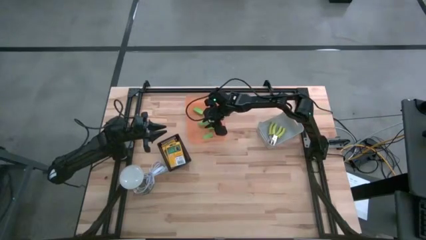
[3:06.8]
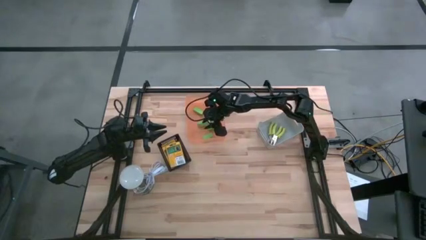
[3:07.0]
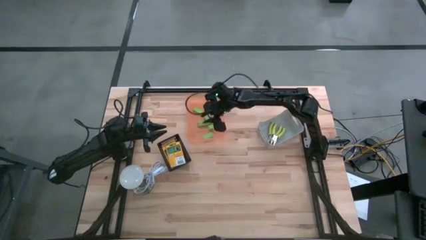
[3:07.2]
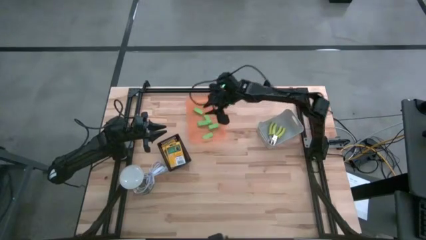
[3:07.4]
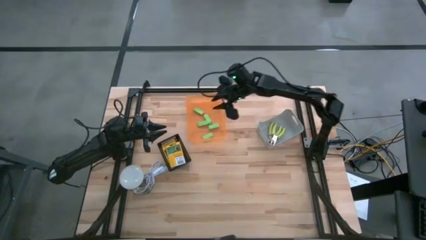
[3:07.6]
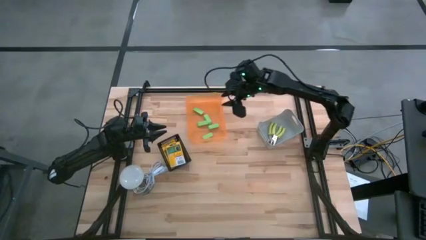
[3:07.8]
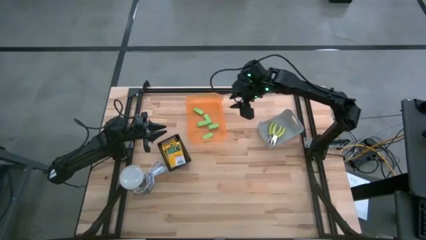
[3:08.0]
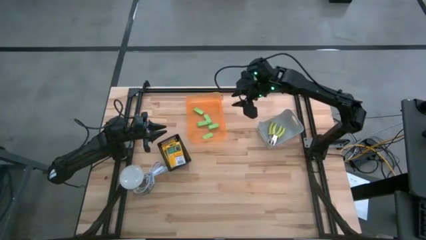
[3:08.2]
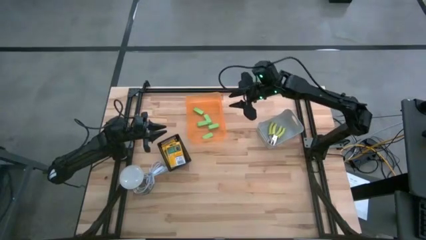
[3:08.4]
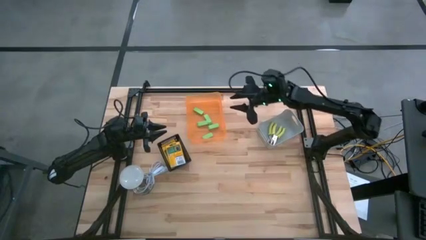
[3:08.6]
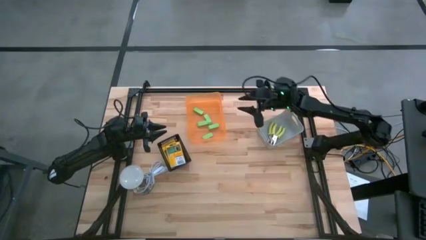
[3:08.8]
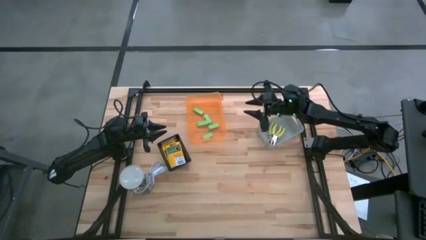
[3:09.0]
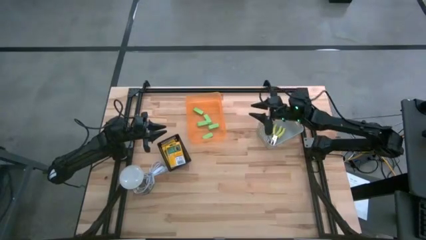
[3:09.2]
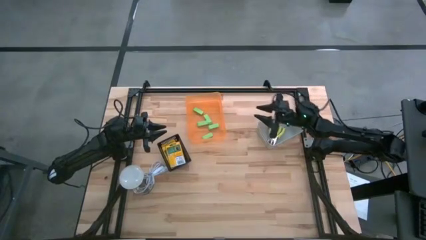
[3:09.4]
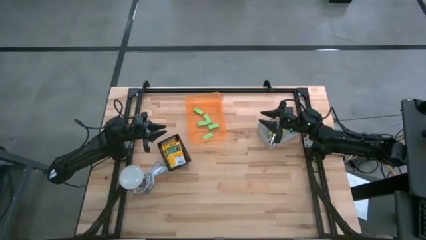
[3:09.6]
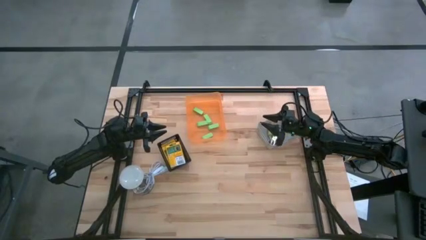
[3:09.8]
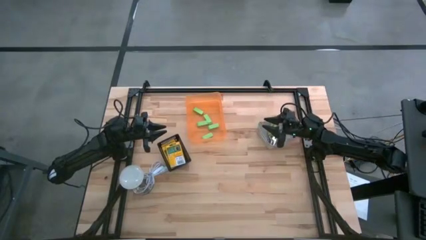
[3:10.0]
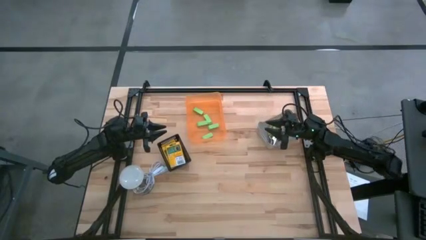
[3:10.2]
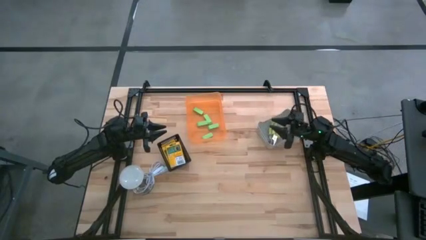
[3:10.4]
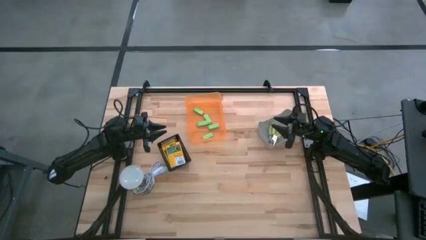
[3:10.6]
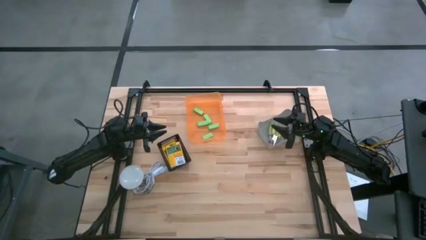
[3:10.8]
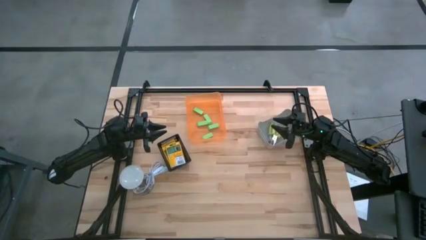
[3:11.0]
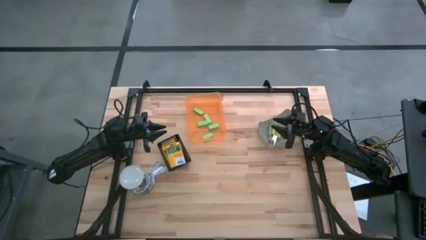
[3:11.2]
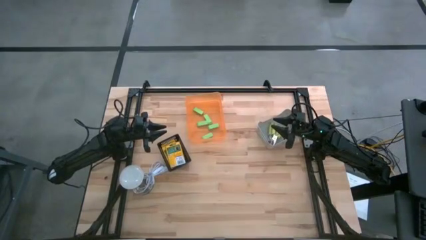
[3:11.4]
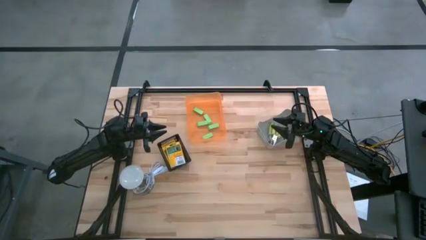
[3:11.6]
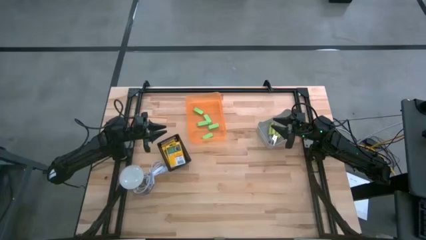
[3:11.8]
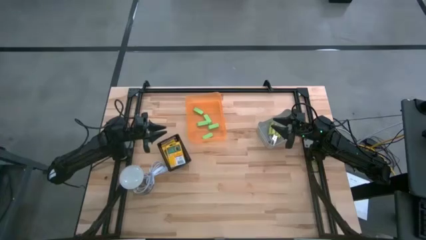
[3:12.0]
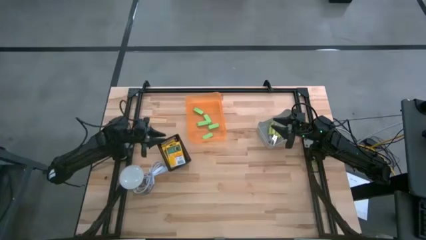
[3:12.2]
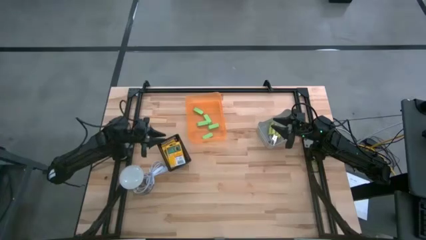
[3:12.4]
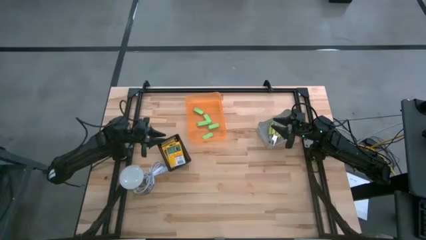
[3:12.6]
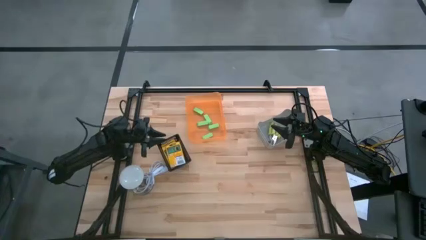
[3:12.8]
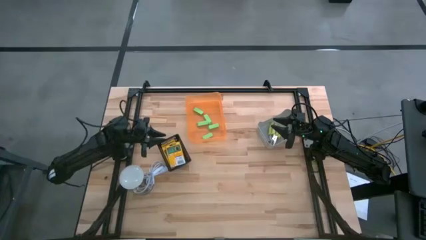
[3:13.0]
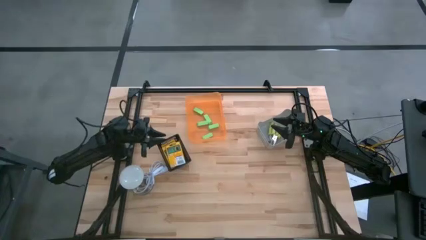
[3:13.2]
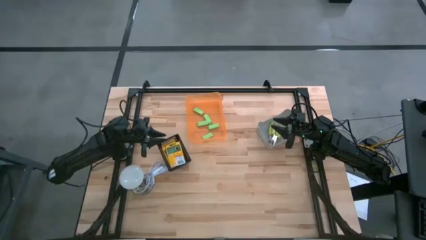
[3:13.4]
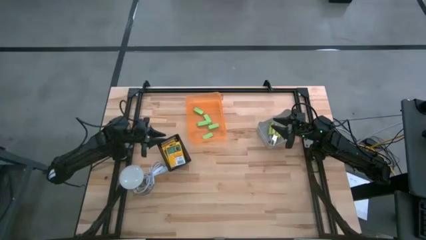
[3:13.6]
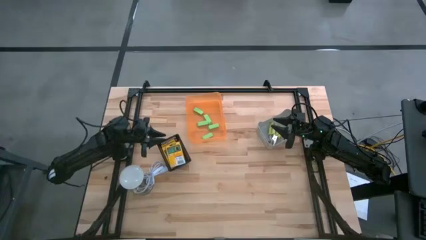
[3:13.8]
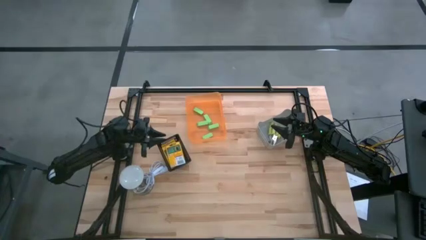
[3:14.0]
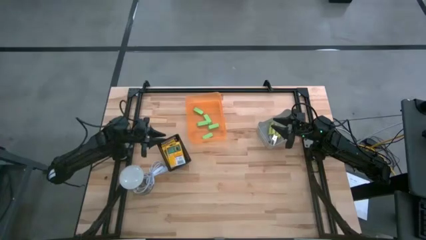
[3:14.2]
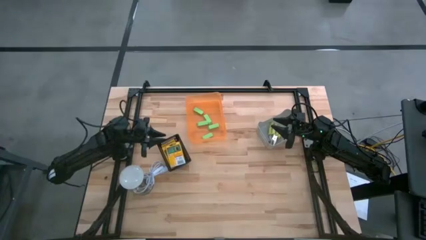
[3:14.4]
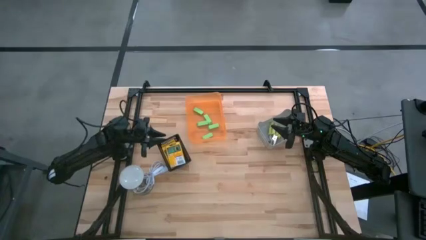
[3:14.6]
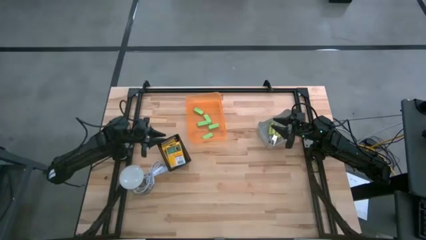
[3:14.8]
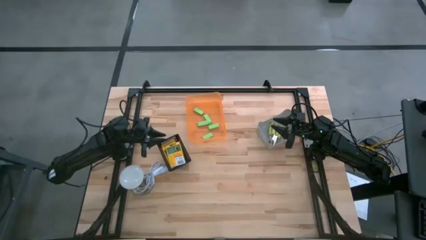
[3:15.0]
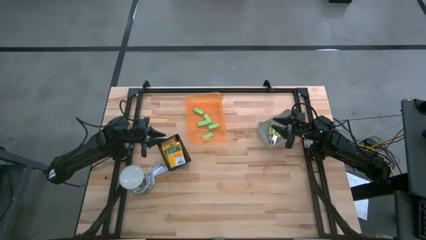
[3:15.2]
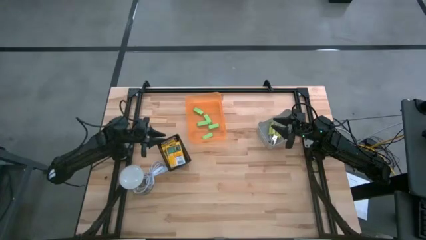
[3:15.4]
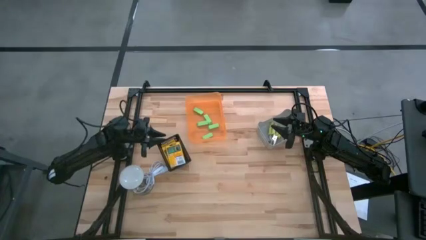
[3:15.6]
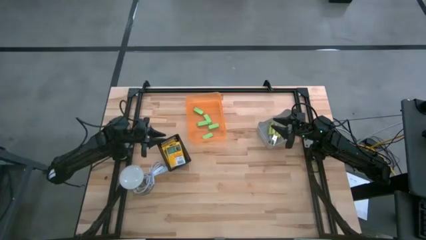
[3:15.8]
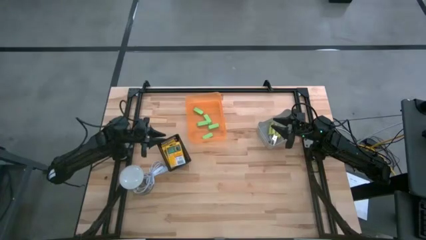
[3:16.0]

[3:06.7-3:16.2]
Task: Pick & Place School Supplies
Return to Home Position

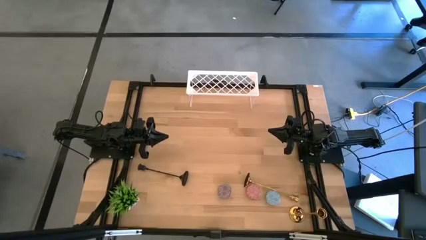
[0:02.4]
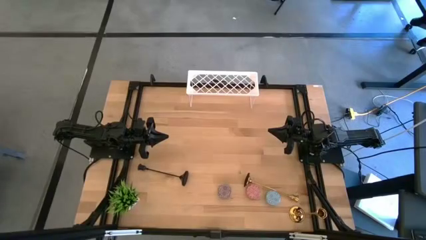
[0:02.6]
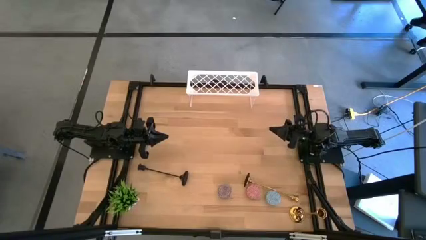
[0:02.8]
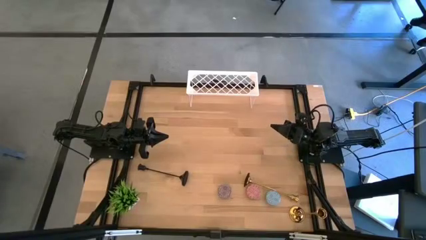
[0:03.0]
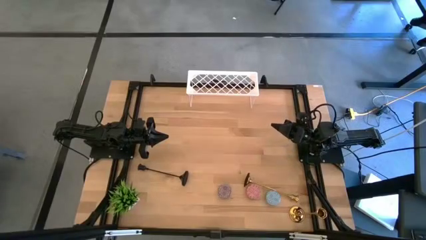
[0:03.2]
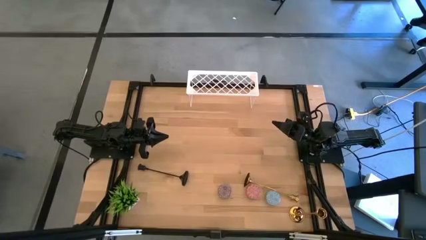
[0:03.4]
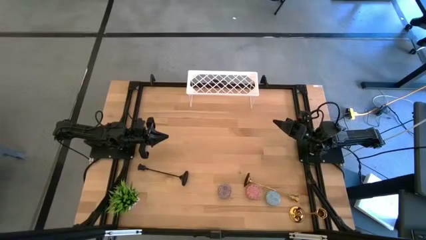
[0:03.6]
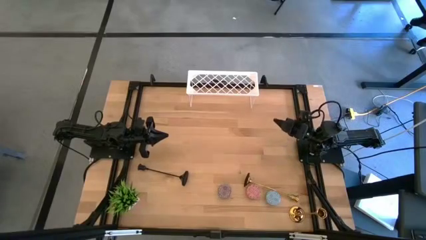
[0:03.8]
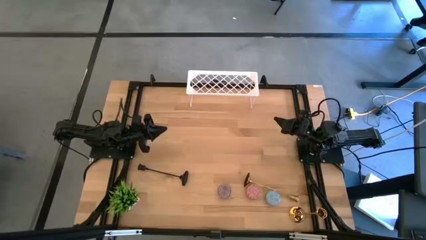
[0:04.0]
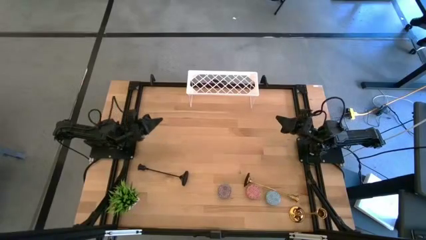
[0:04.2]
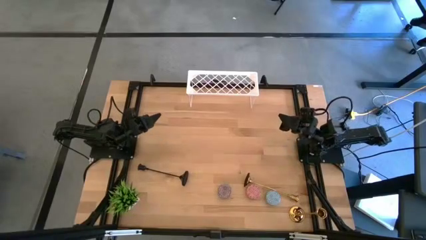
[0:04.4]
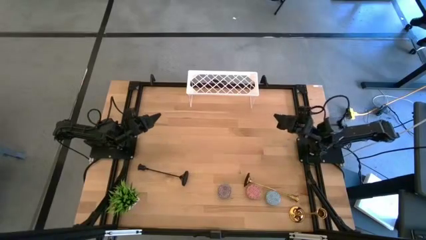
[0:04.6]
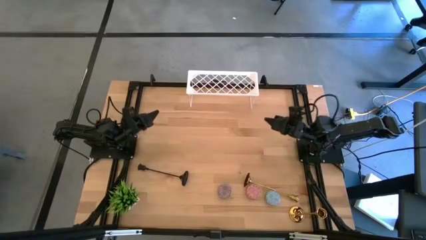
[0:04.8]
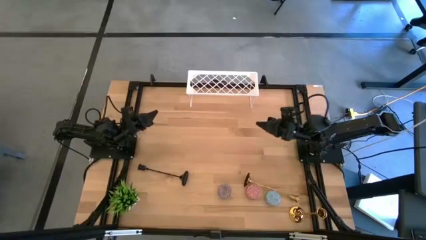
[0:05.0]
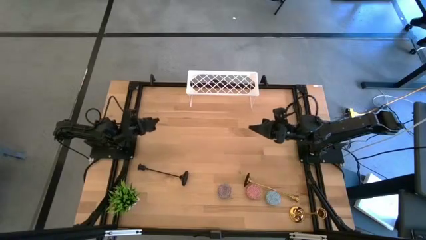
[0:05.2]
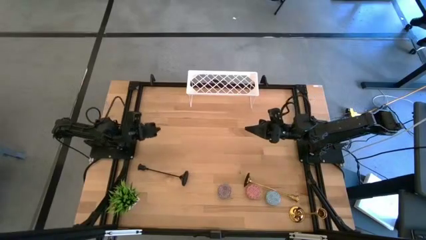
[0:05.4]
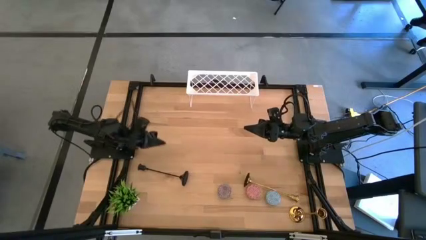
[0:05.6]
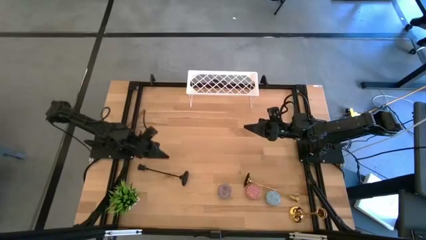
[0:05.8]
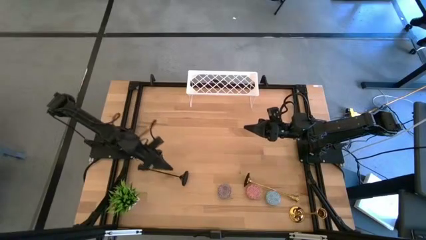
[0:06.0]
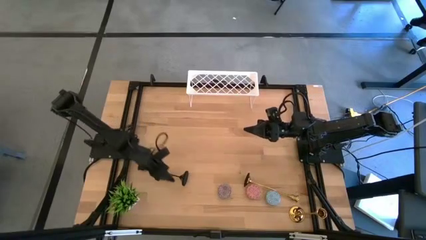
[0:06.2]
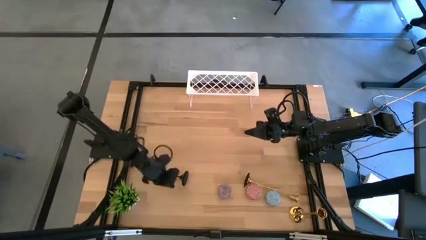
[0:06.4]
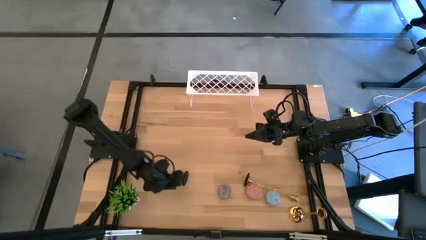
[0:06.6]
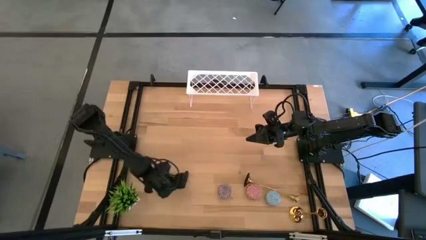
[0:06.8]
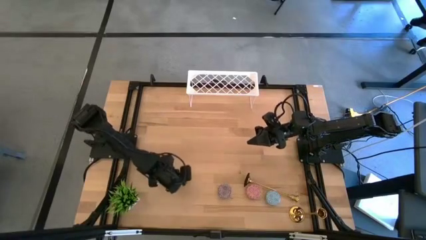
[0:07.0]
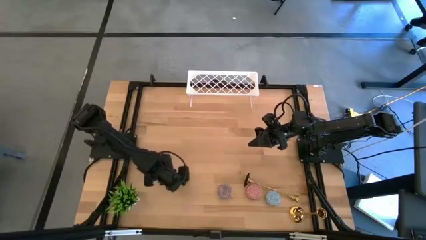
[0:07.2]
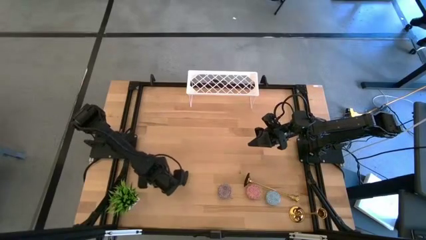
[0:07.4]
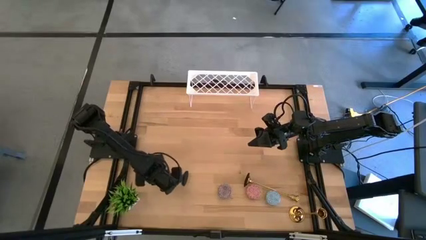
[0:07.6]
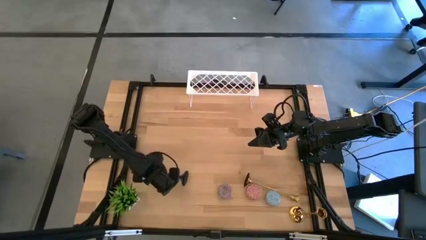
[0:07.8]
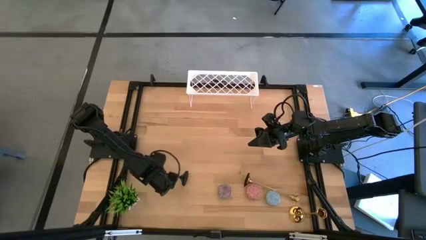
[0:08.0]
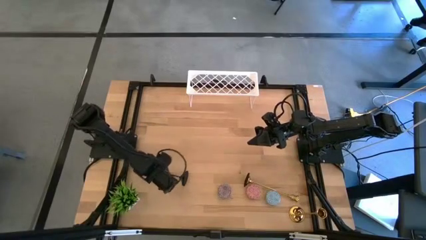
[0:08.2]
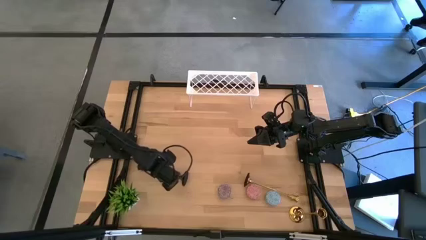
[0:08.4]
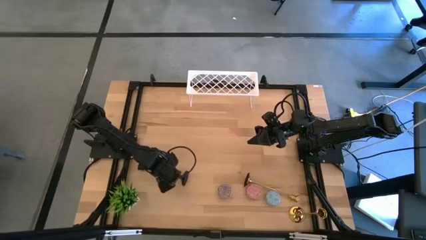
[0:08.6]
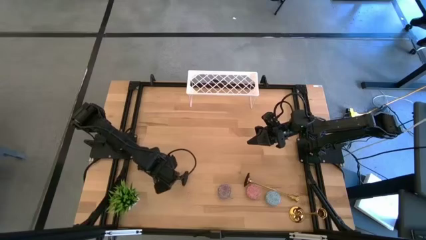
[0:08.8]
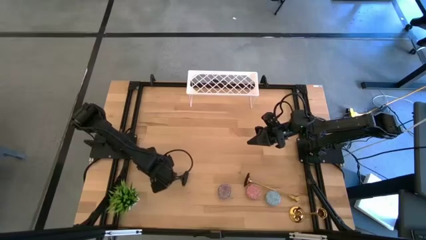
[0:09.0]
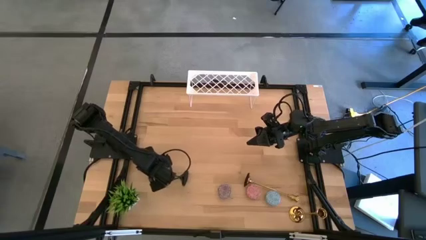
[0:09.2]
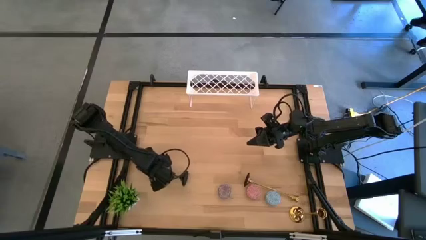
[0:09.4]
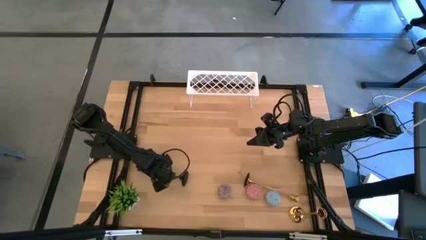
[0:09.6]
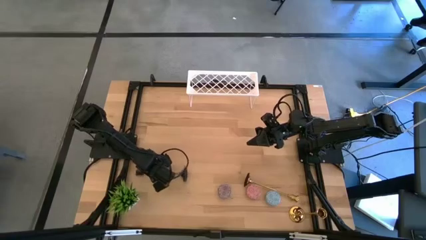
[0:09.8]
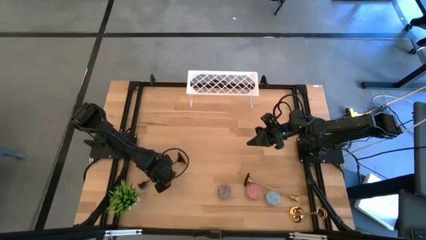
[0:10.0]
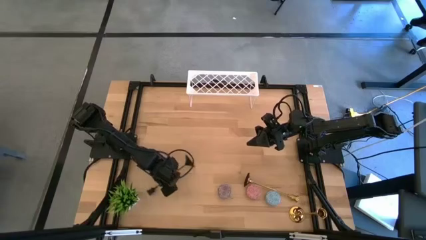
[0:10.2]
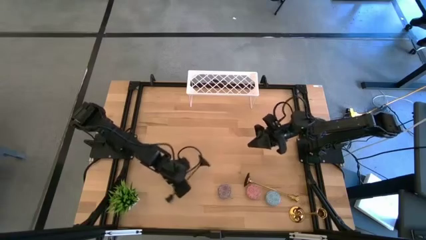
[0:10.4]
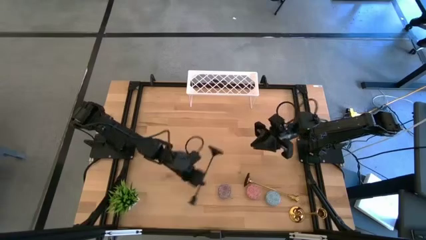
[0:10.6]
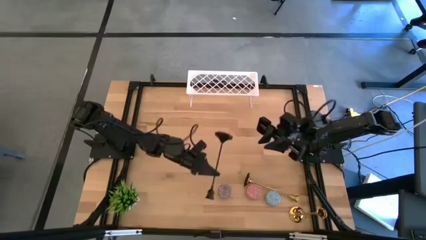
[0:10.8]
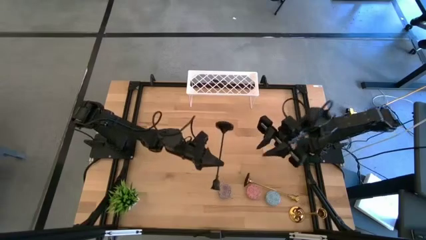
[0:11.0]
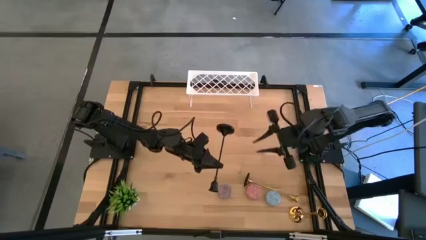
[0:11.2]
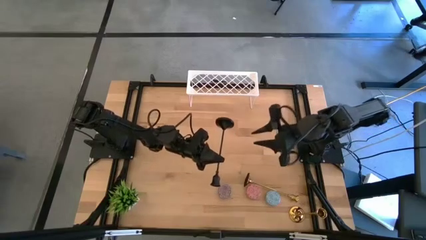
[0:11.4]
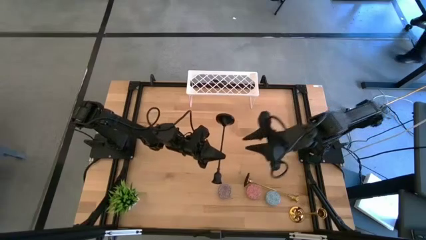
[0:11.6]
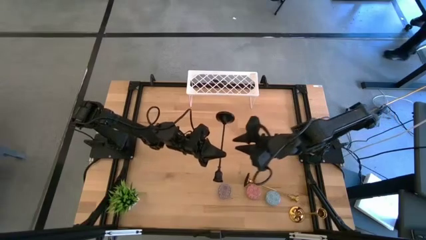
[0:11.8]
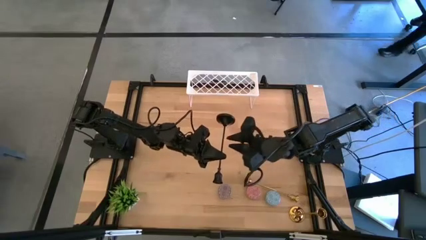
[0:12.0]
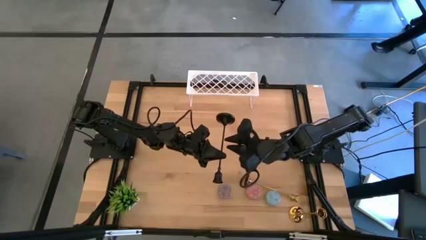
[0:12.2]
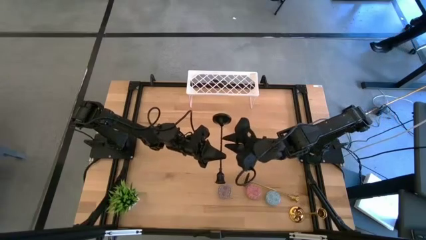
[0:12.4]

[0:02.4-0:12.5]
Task: Pick & Place candle stick holders
Put the black candle holder on the shelf
